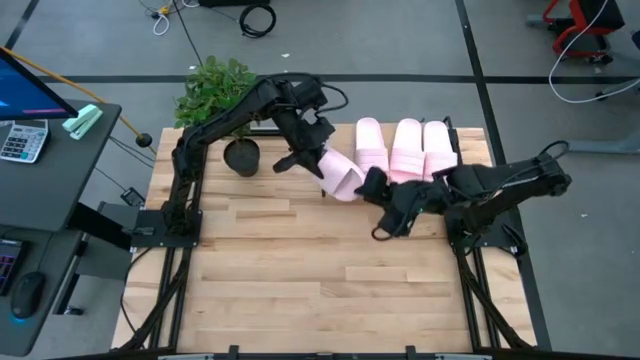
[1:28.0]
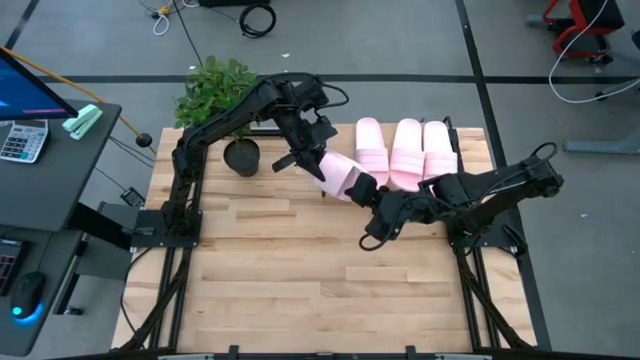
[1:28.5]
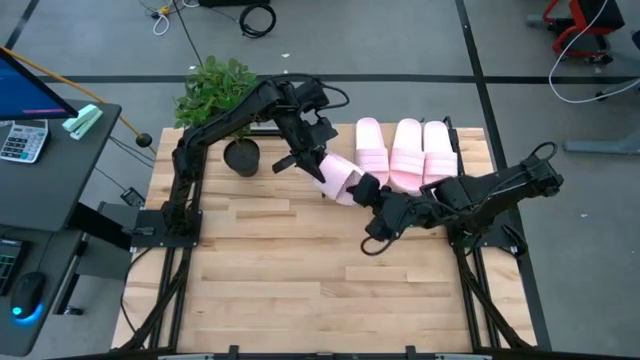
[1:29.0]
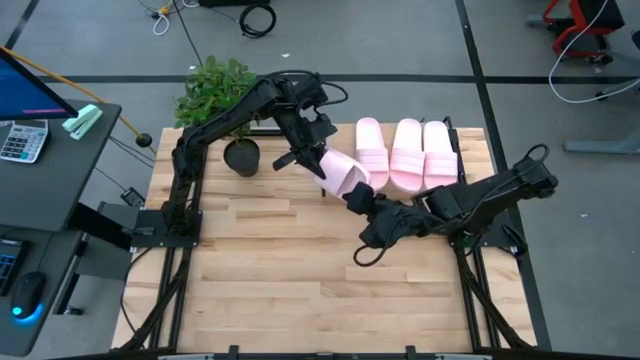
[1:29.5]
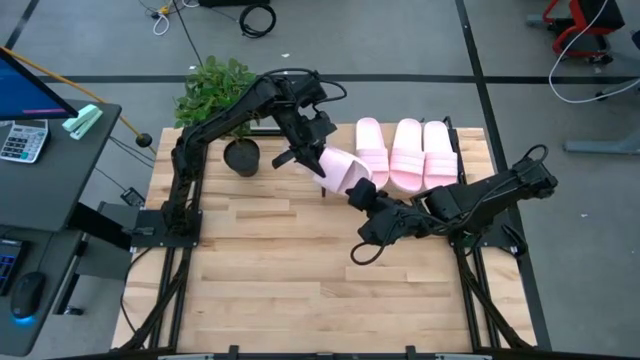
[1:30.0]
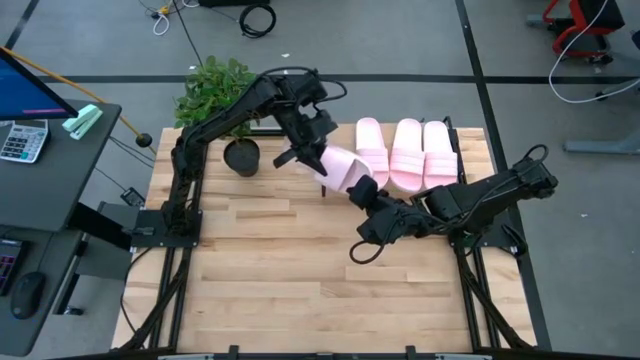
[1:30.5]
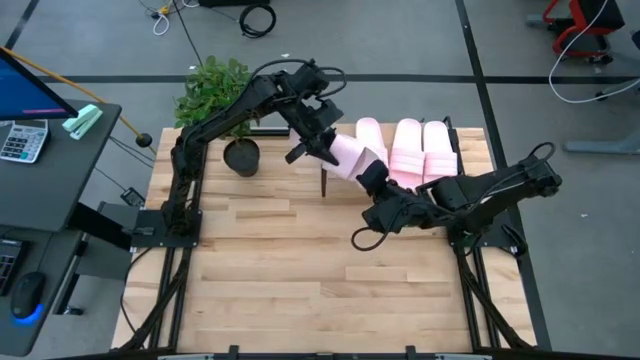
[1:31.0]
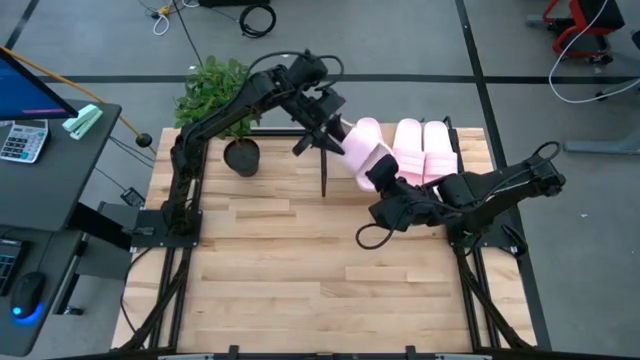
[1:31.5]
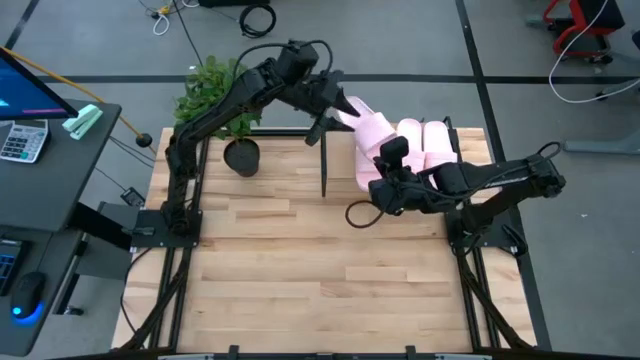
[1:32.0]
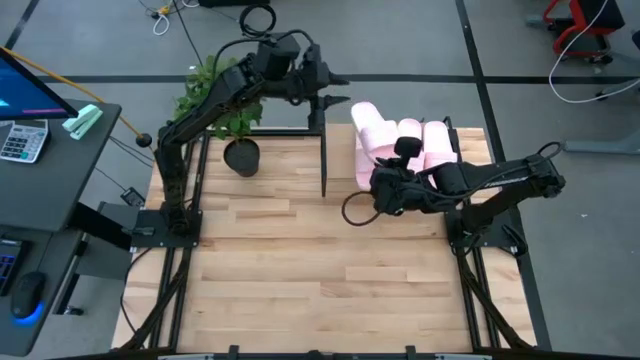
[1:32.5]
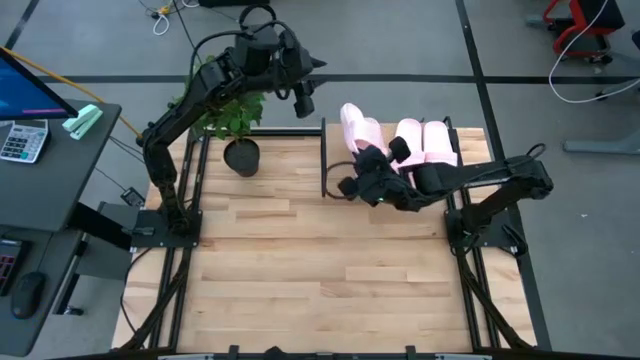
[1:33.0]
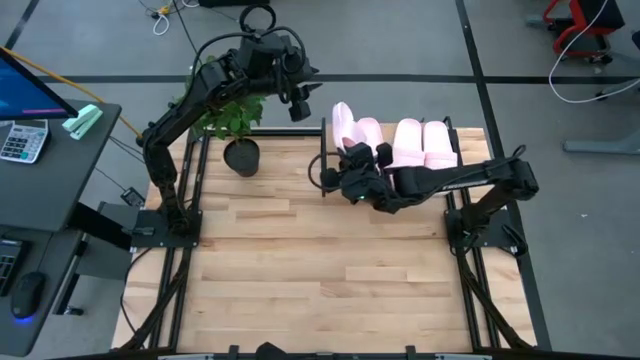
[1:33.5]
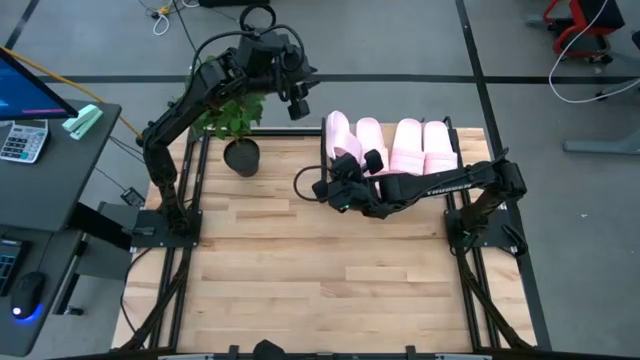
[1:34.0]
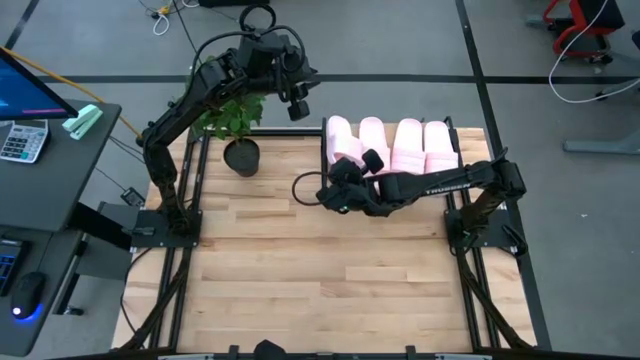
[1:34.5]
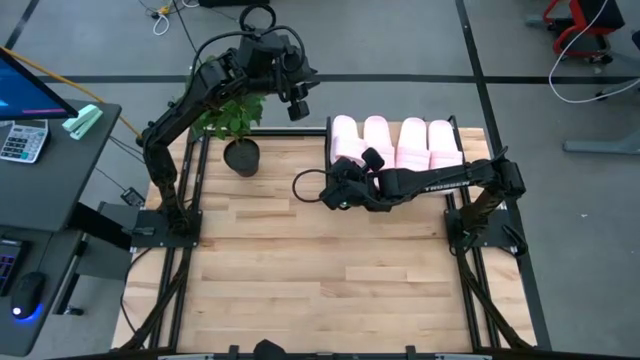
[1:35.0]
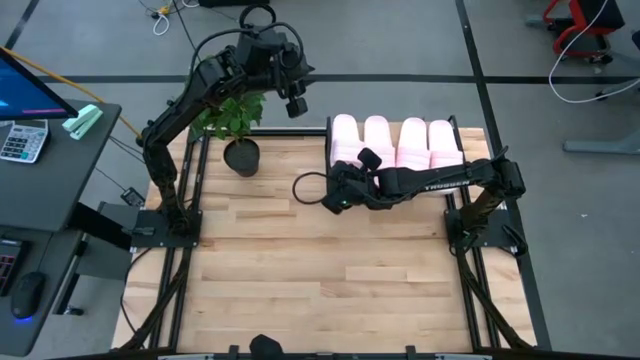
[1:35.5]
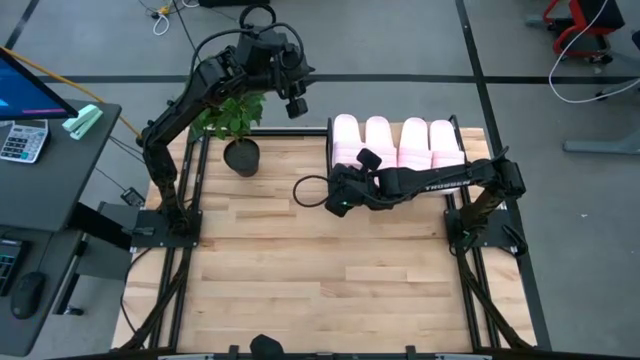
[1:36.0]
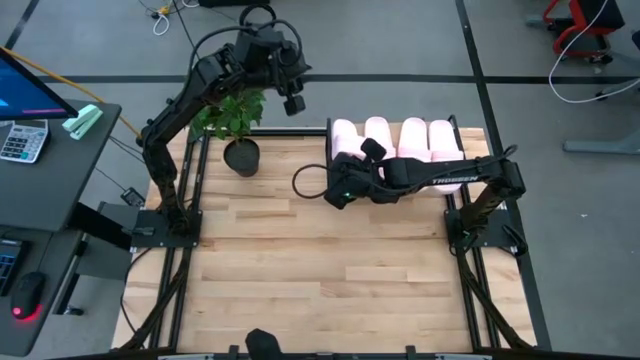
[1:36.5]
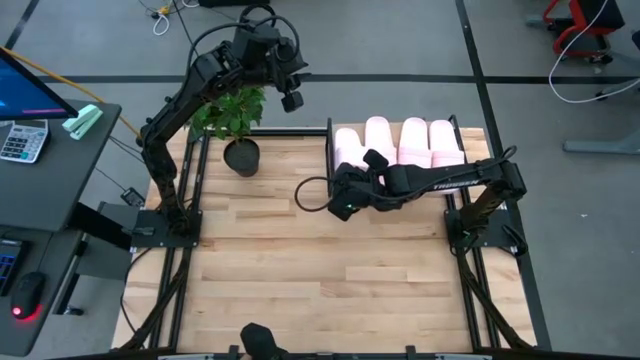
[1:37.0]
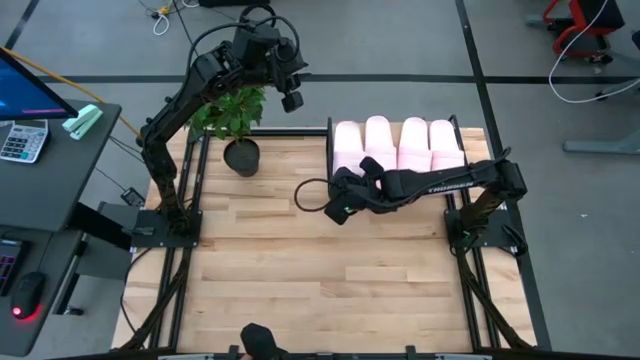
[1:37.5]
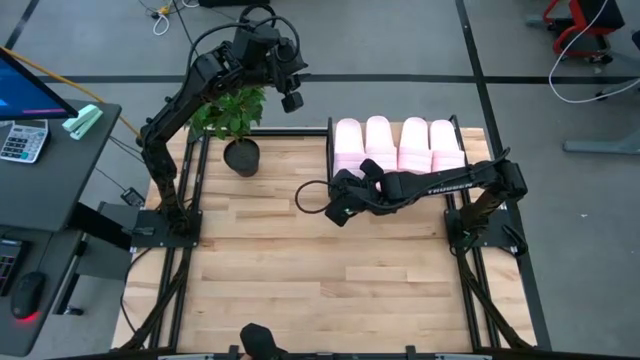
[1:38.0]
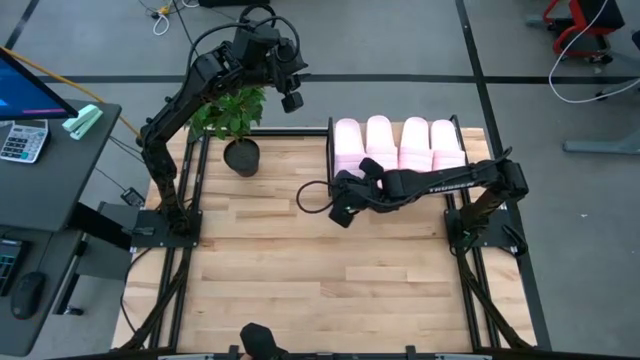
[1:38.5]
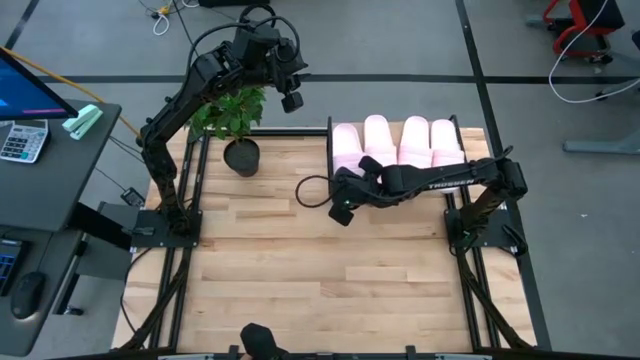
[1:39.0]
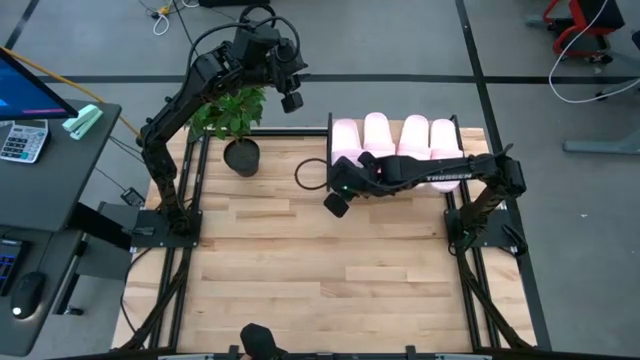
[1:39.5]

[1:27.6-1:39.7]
Task: Pick and place slides into the shelf
Put the pink slide on the shelf

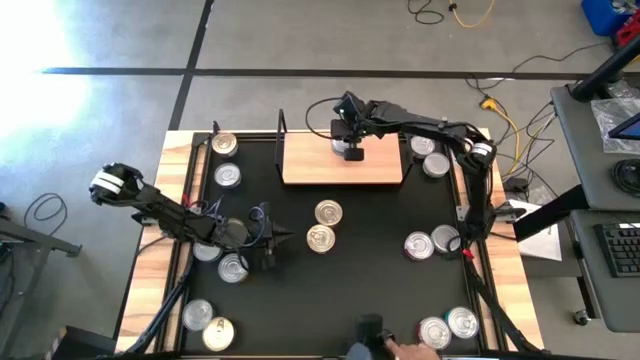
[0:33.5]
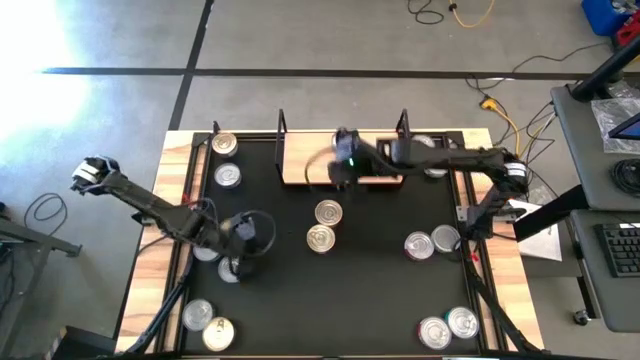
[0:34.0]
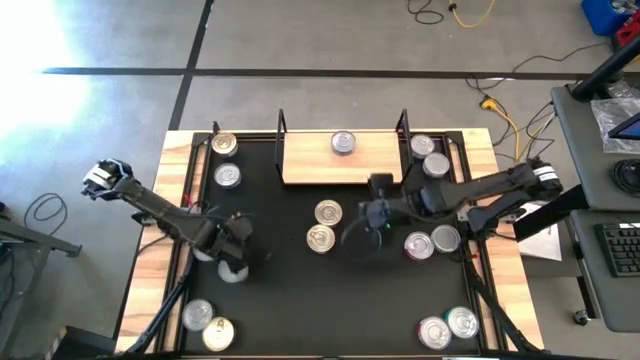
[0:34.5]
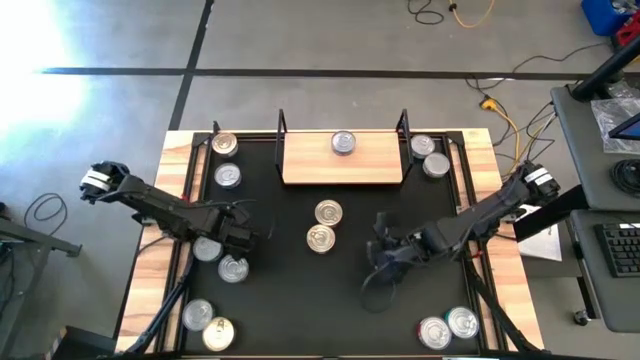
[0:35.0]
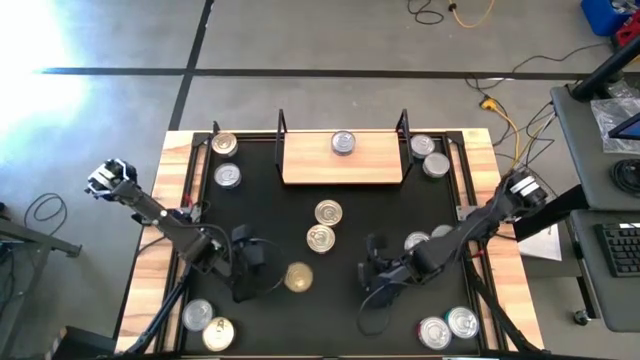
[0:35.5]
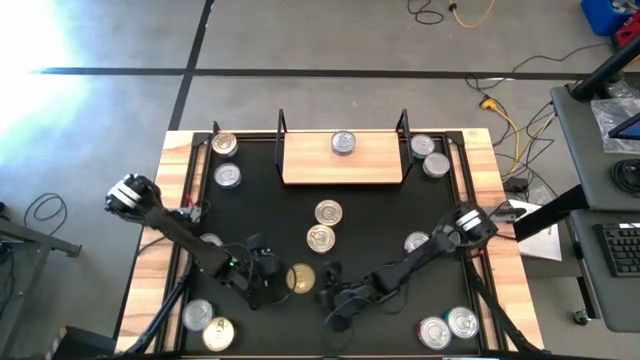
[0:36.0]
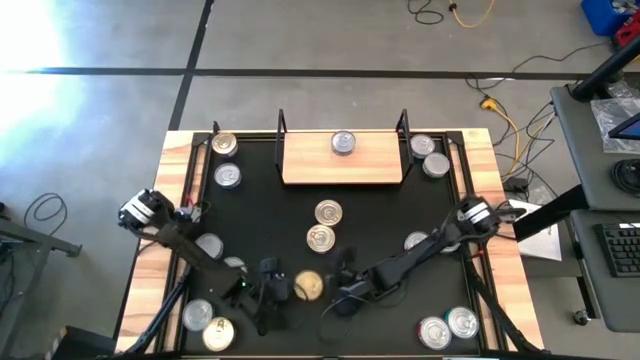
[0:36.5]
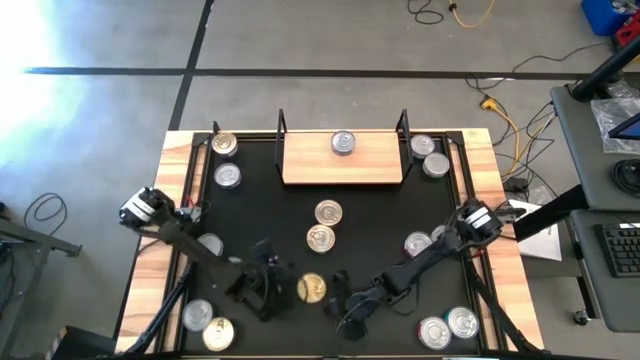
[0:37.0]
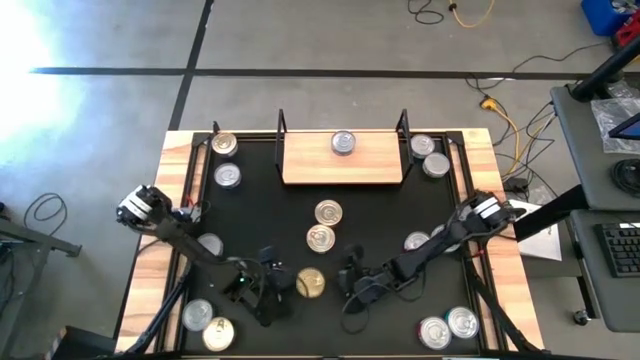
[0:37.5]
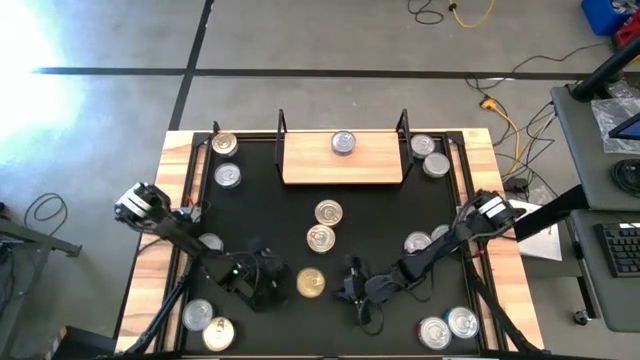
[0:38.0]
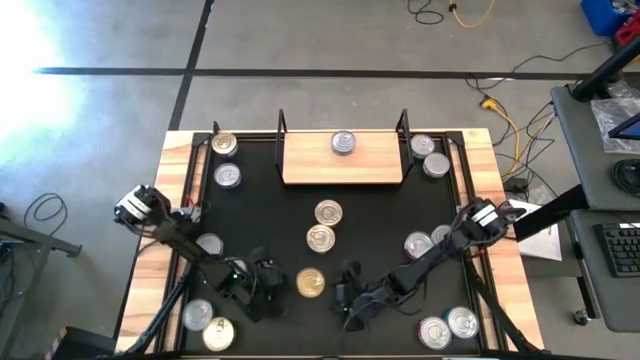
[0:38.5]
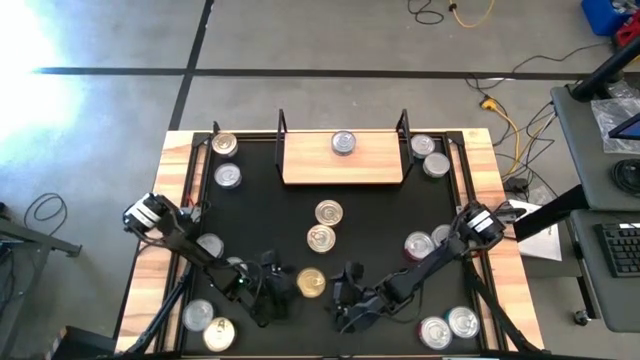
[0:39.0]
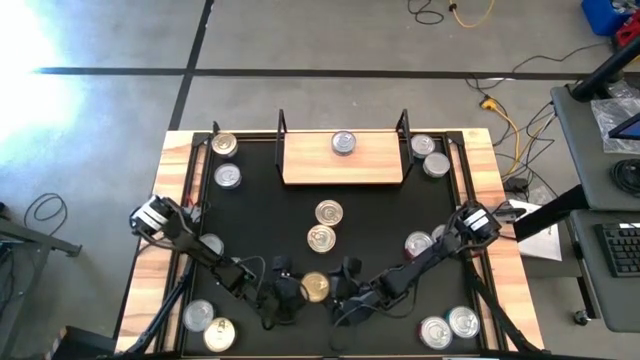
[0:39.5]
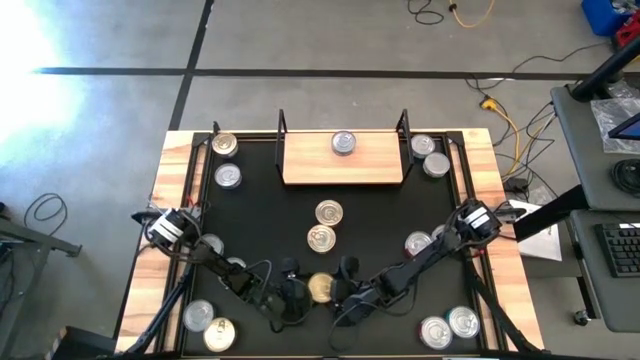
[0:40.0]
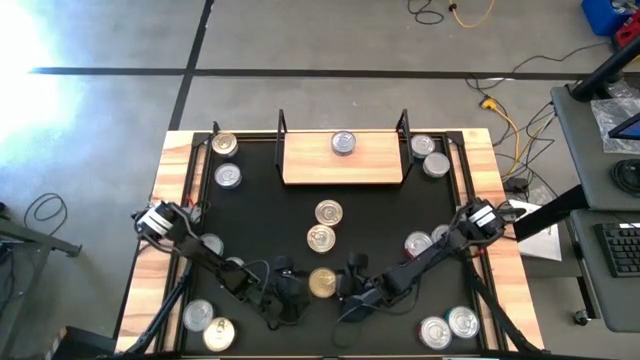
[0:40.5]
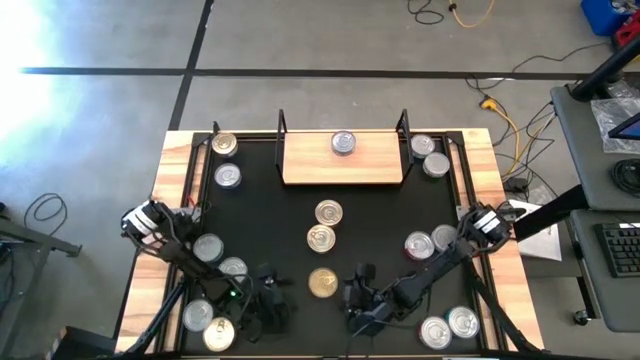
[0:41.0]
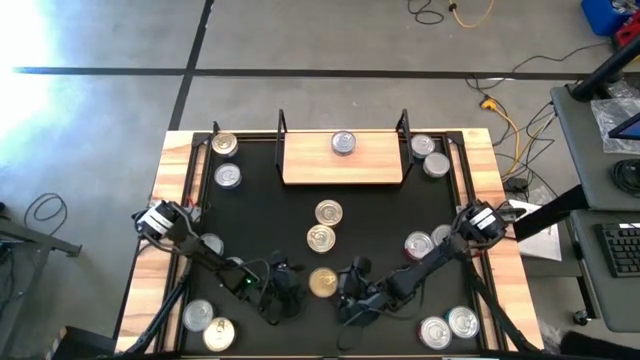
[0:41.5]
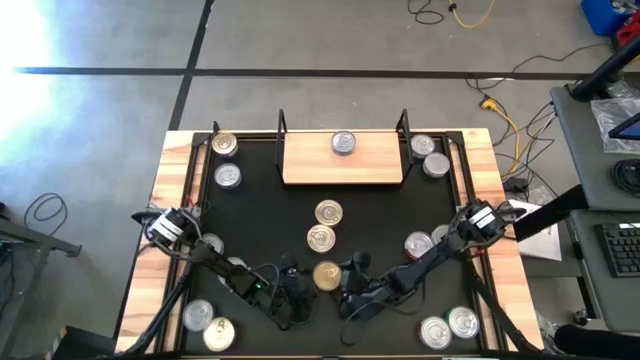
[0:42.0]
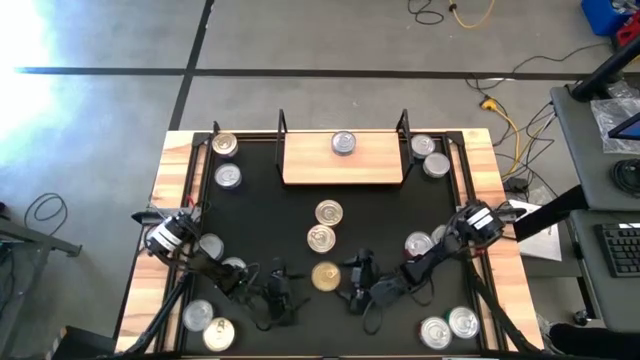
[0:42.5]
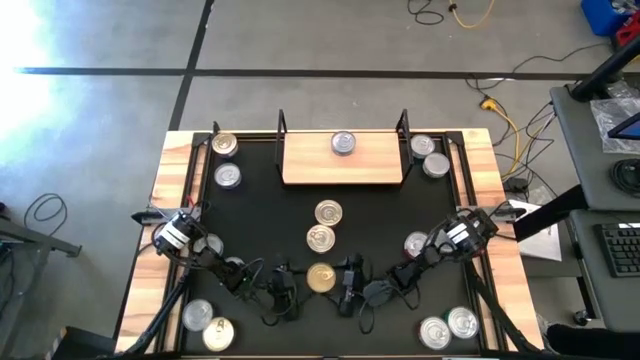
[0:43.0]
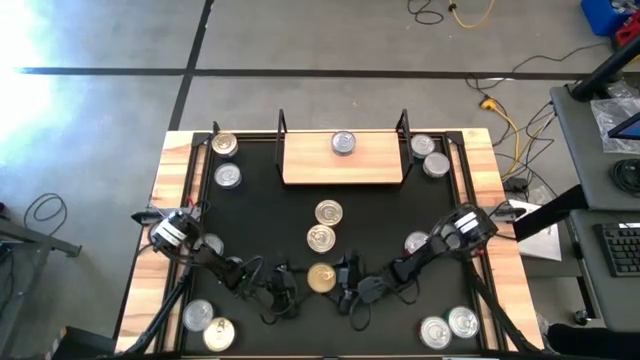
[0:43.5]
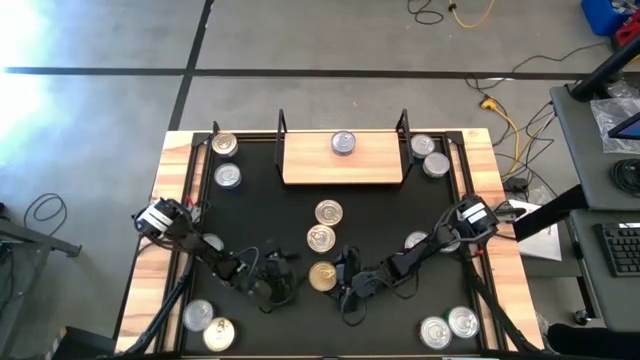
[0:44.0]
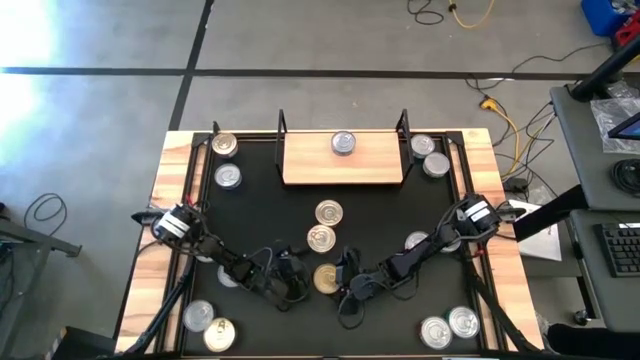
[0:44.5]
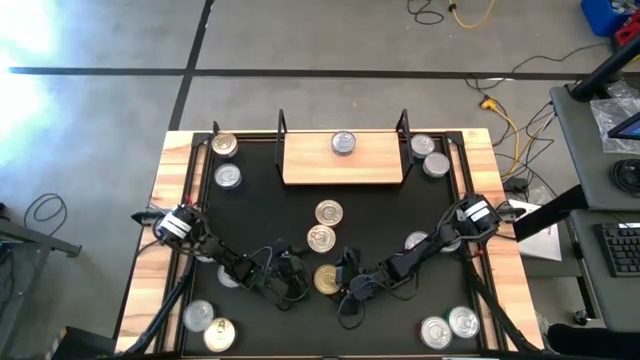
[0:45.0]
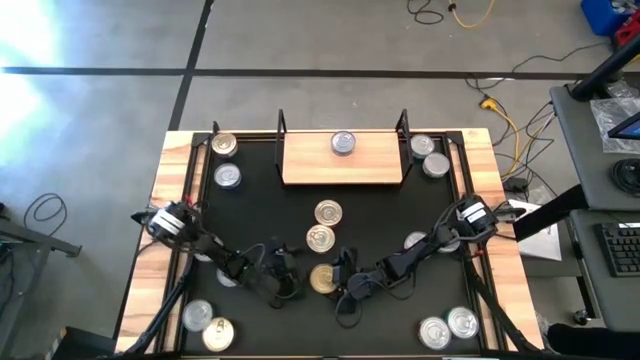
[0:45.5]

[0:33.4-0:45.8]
Task: Stack canned seafood by type on shelf
Stack the green tuna can on top of the other green tuna can on the shelf
